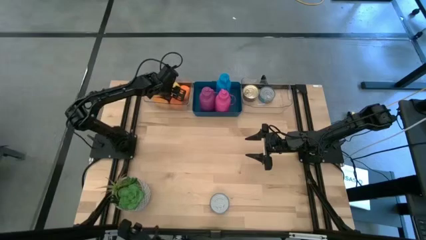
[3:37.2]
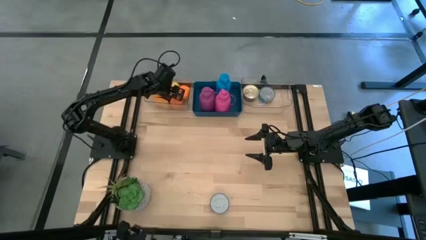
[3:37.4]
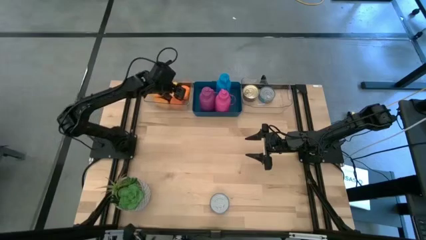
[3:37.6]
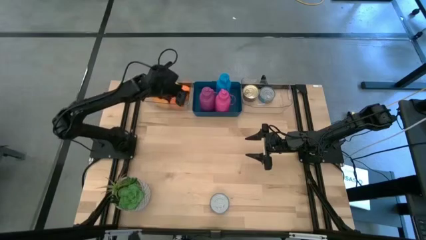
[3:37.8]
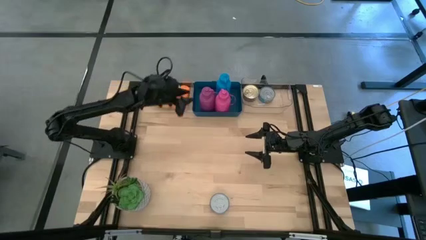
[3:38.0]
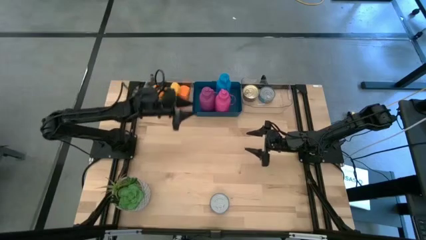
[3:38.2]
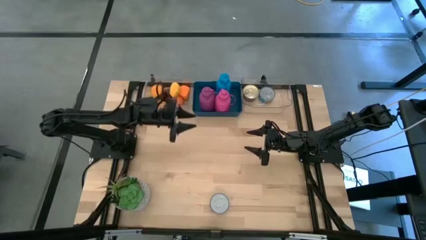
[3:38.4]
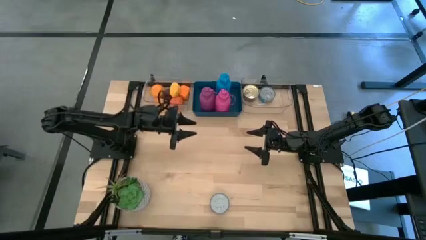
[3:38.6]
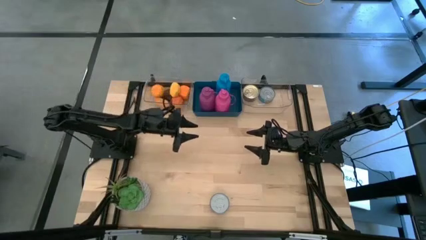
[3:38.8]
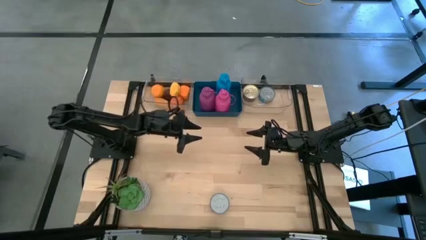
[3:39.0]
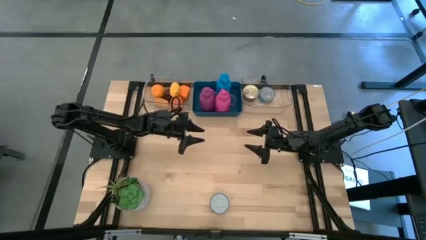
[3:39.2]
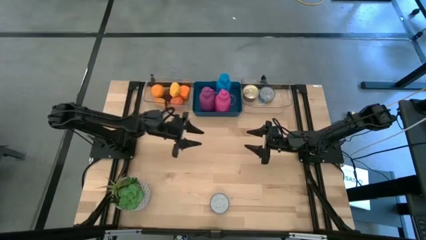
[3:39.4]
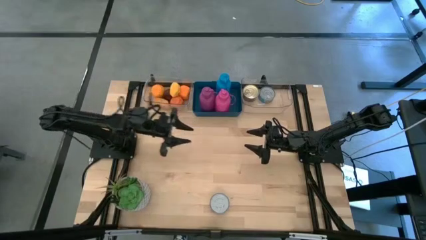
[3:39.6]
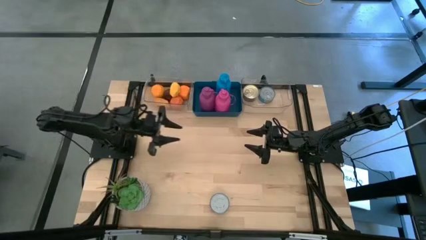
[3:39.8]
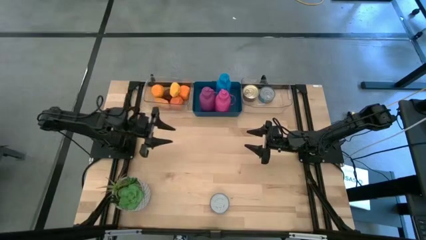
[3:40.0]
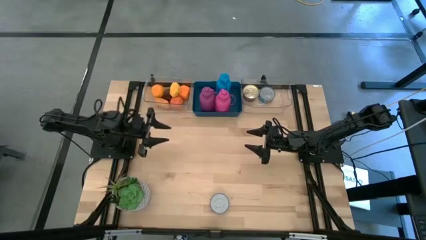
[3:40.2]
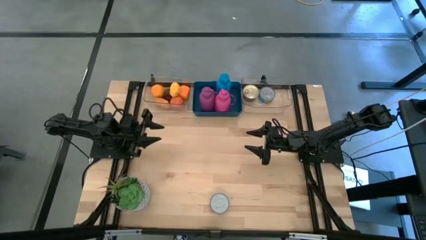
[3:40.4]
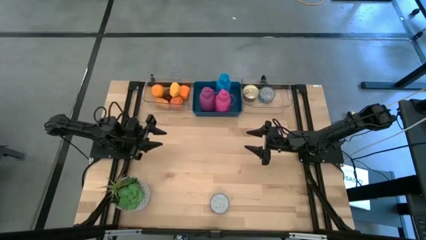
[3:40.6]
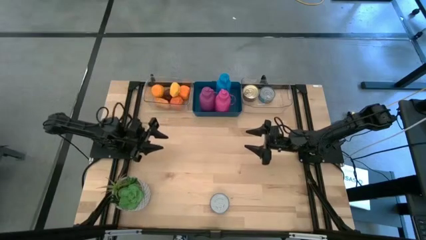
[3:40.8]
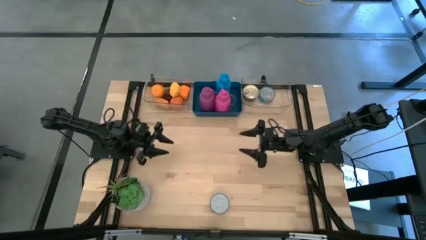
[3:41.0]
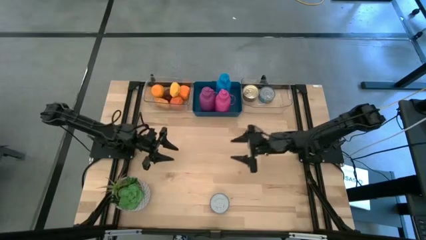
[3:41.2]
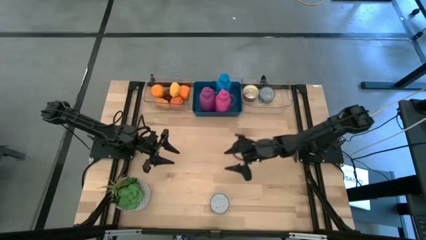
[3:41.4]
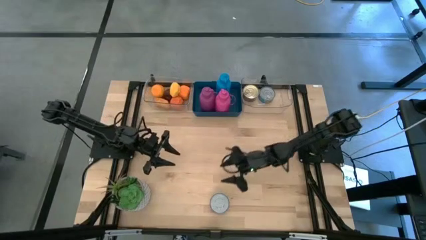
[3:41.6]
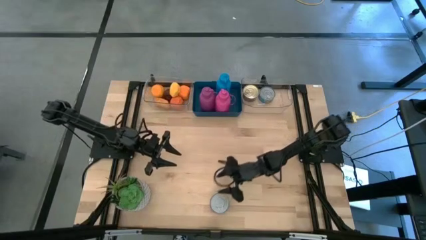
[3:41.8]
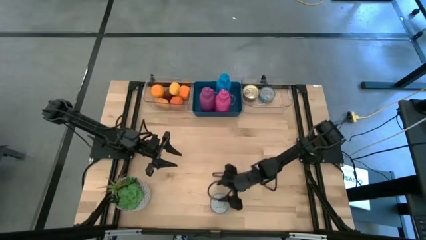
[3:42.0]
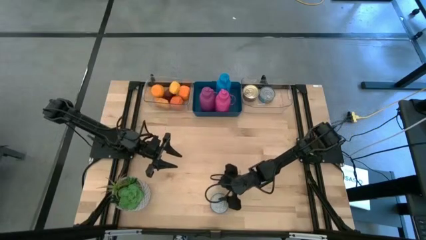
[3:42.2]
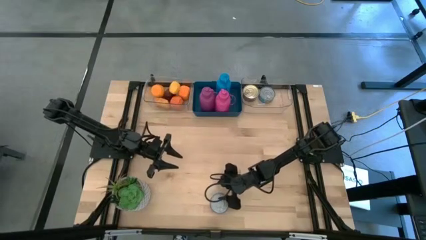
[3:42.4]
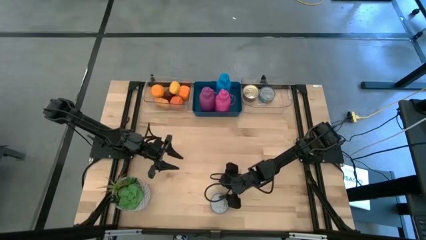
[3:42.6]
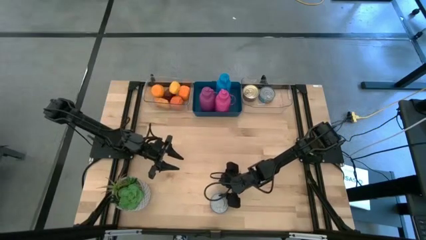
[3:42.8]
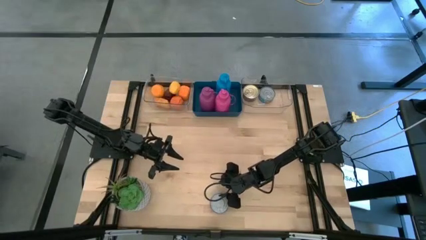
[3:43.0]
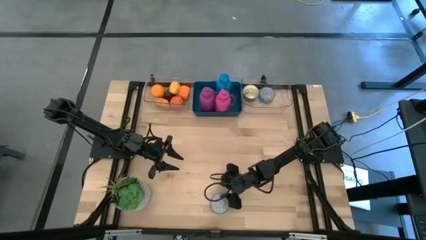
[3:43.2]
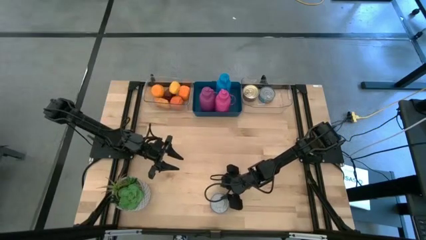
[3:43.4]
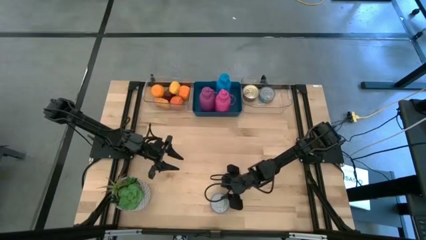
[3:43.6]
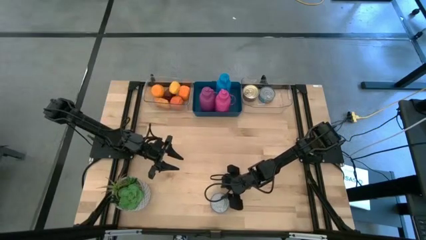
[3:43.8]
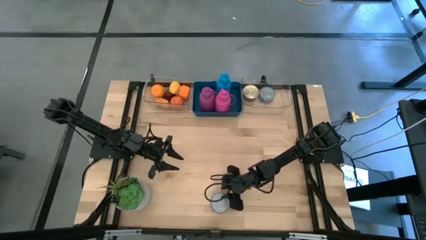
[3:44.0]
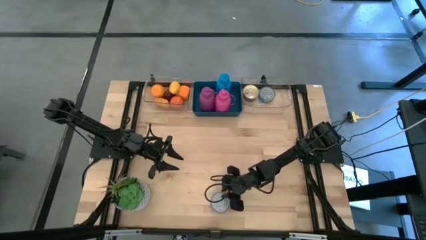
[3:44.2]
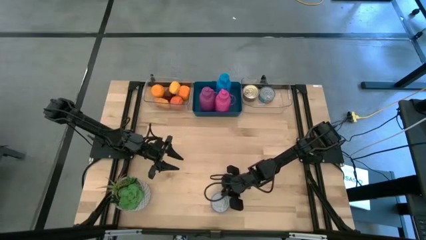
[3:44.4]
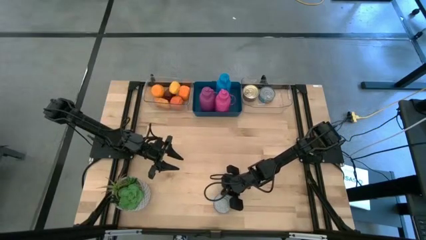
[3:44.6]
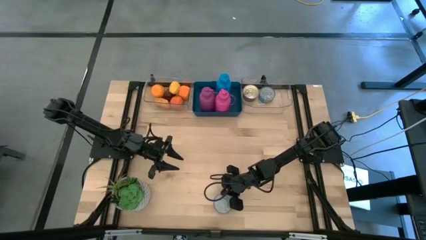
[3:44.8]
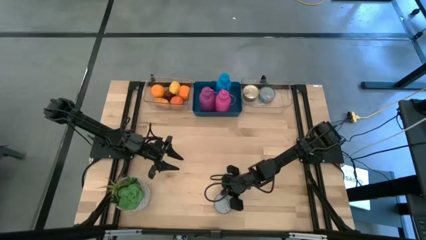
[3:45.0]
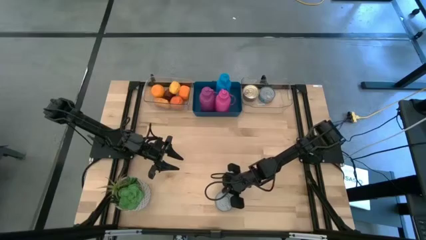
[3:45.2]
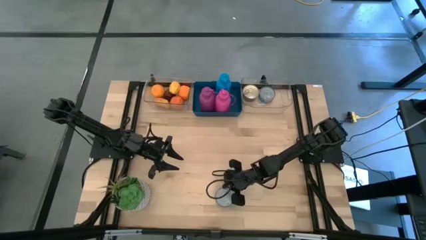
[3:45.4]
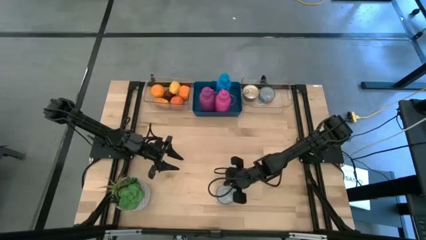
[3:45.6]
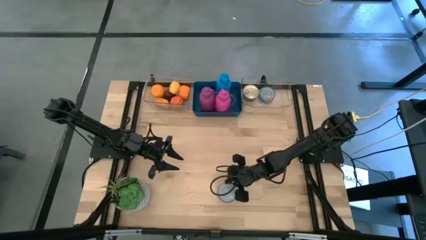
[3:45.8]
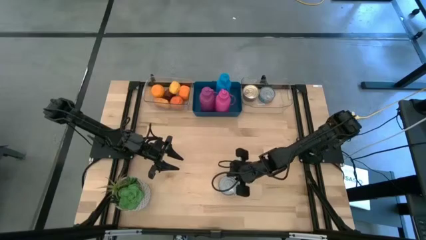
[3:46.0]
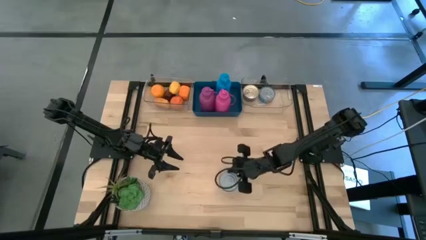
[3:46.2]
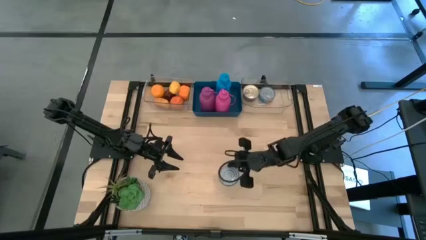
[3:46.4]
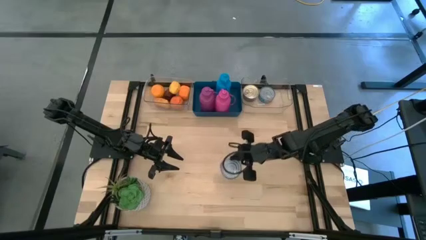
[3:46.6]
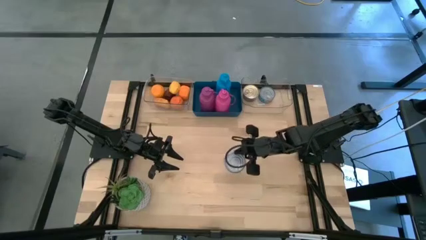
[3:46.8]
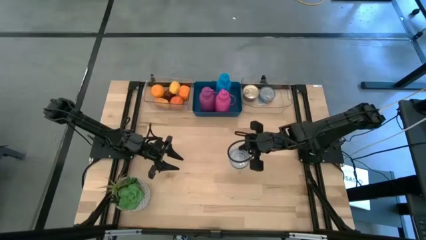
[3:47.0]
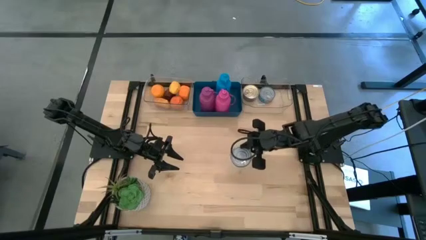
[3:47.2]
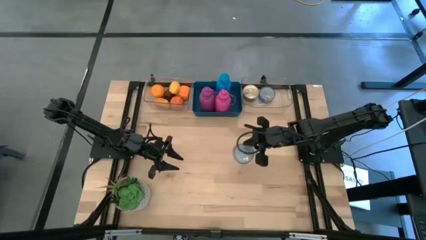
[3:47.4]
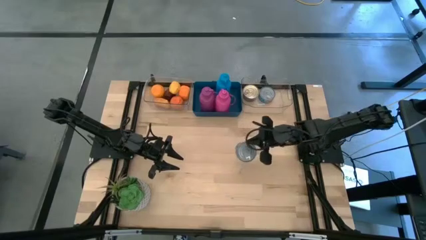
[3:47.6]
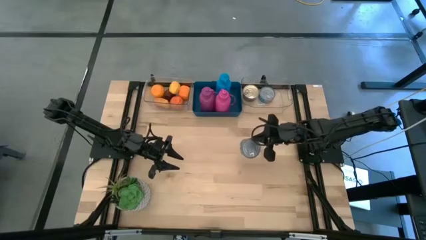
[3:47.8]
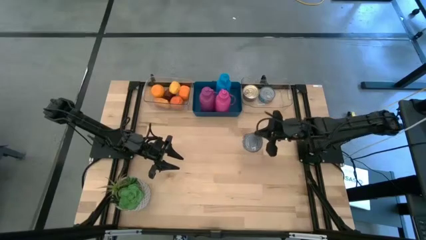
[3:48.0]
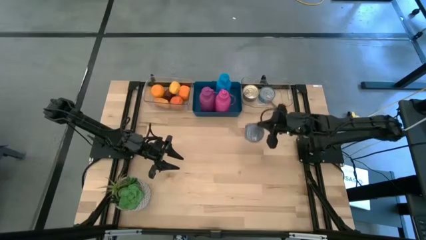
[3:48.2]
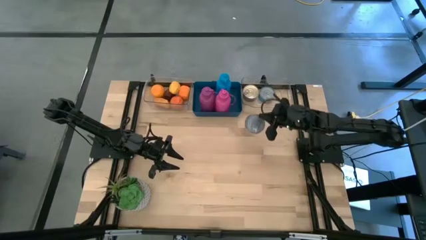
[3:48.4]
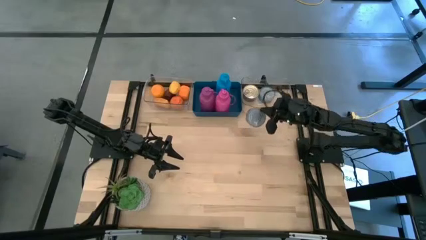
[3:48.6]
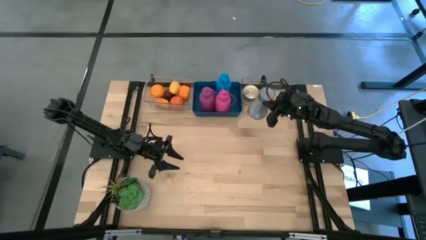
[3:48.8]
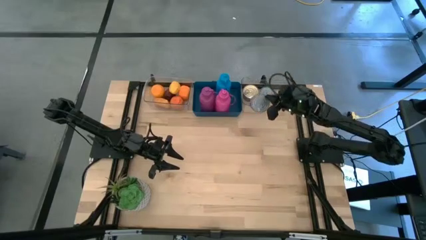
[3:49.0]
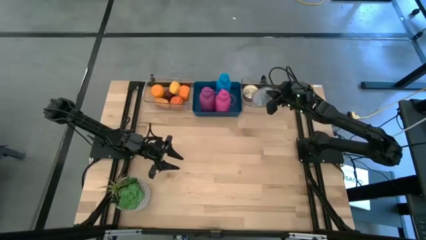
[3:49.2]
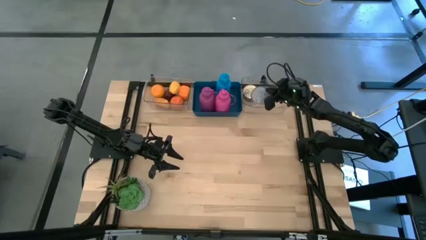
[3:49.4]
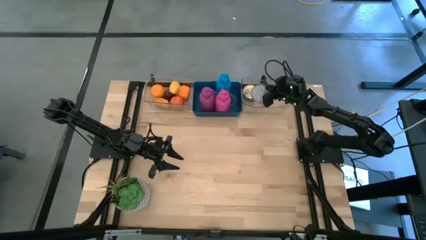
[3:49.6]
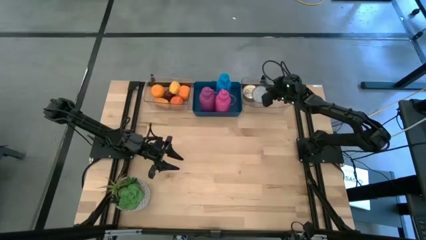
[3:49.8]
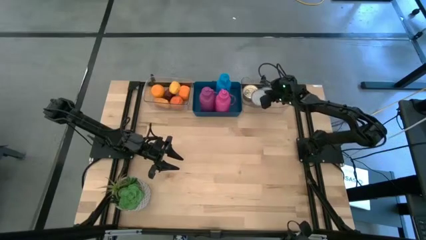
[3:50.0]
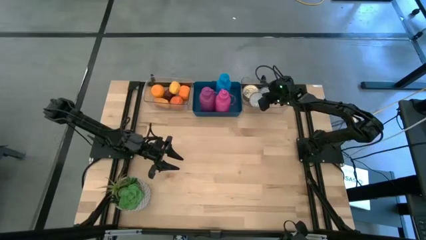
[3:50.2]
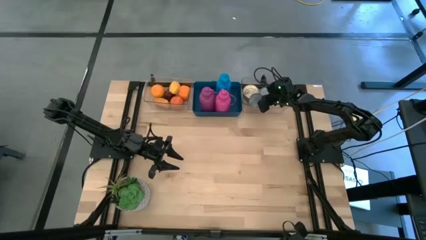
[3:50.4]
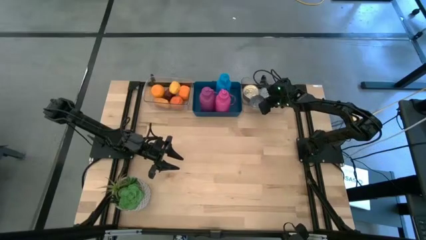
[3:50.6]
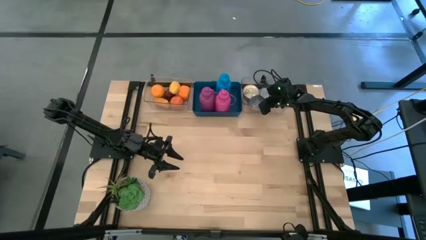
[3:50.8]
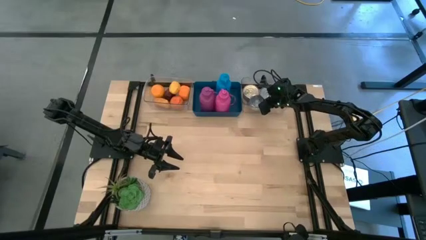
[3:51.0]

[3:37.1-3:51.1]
Task: Pick & Place Food Item
Put the blue tuna can into the right transparent bin

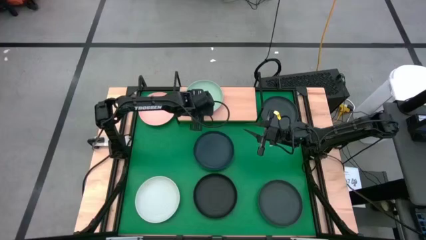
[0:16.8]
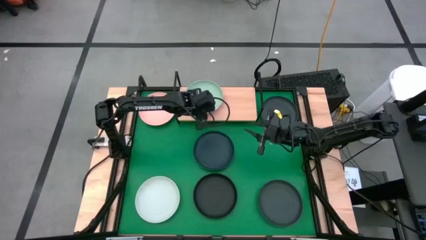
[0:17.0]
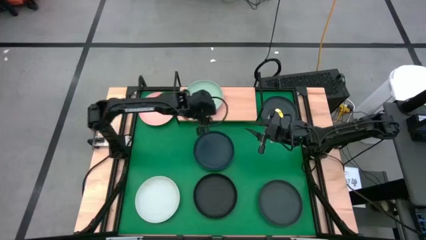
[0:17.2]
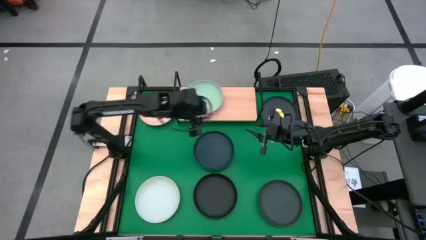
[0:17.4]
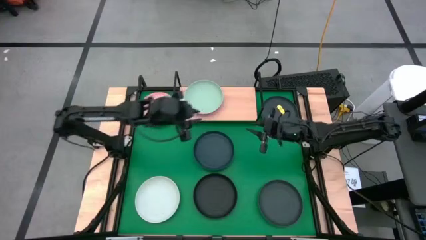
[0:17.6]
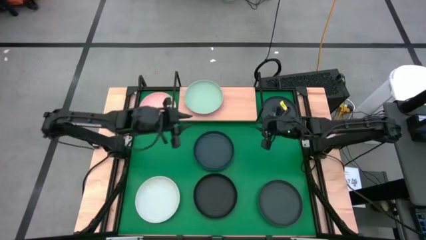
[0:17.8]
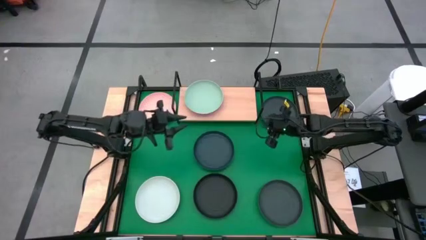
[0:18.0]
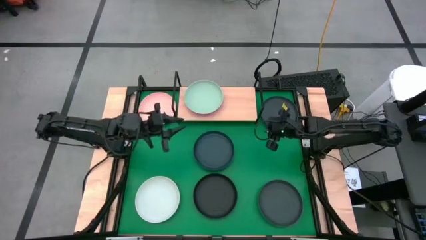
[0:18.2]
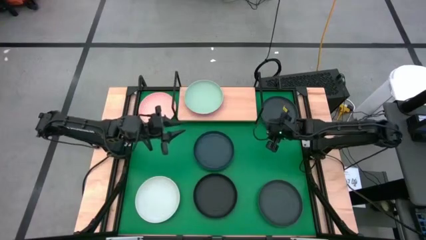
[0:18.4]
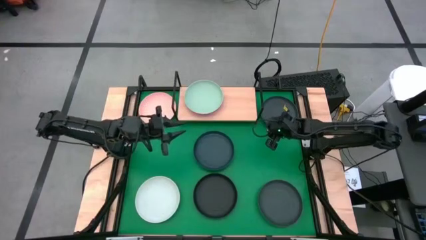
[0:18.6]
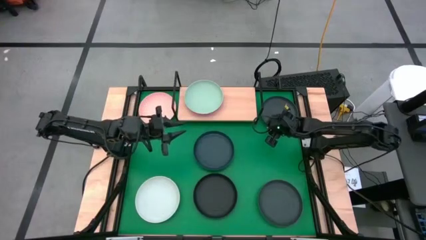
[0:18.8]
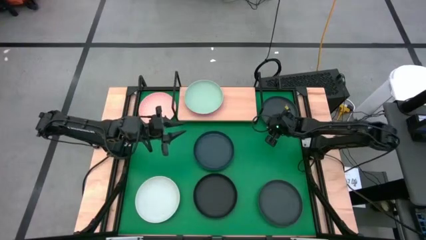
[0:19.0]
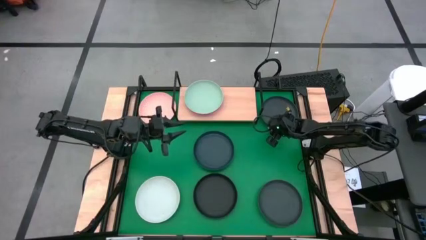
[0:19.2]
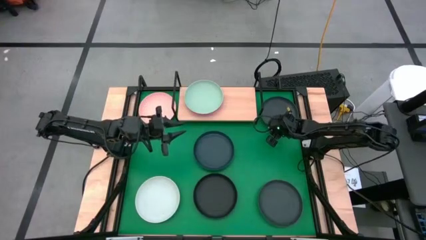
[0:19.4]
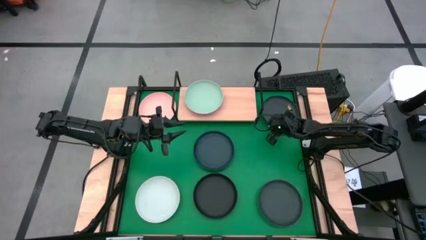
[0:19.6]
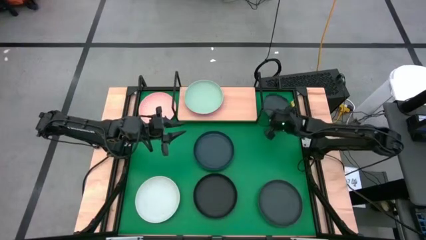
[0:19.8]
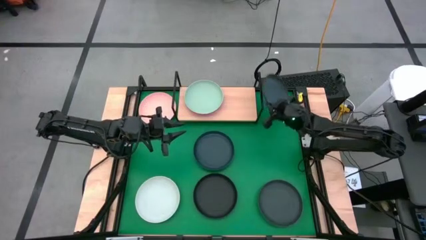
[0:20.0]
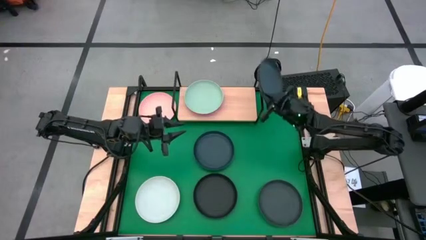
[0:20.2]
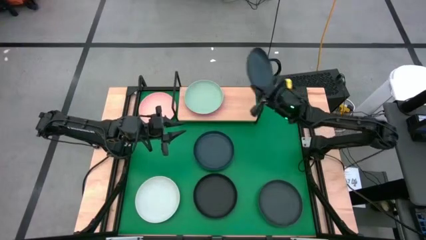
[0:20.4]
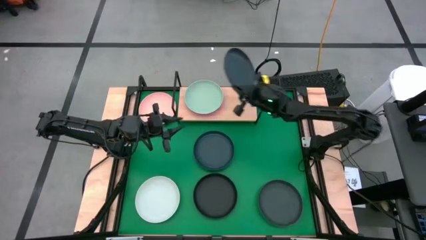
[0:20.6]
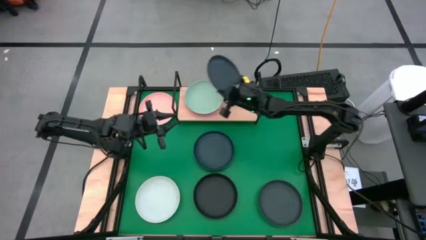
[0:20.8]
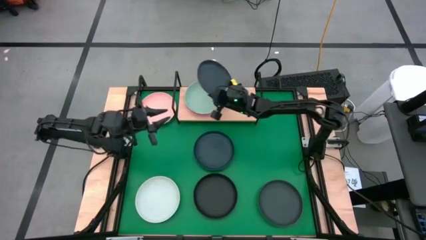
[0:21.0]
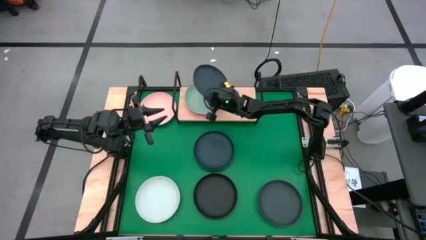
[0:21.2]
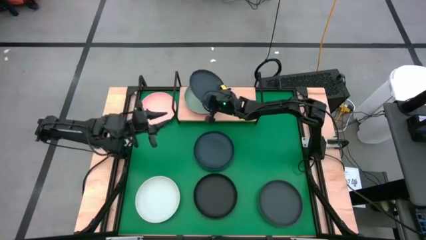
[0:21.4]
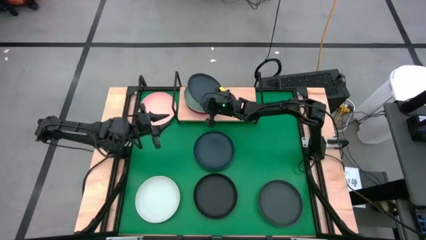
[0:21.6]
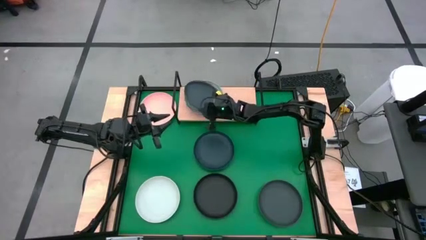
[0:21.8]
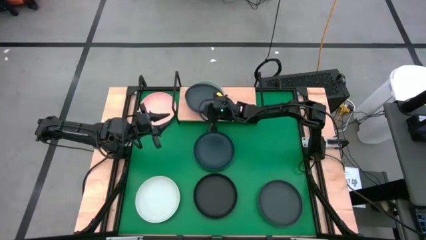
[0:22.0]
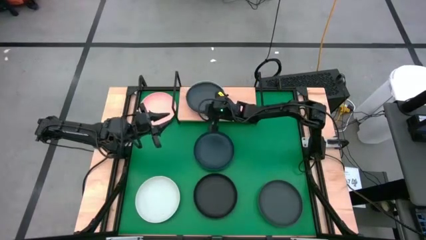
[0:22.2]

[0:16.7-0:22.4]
Task: Place and stack plates onto a shelf
Stack the top dark green plate on top of the green plate on the shelf
